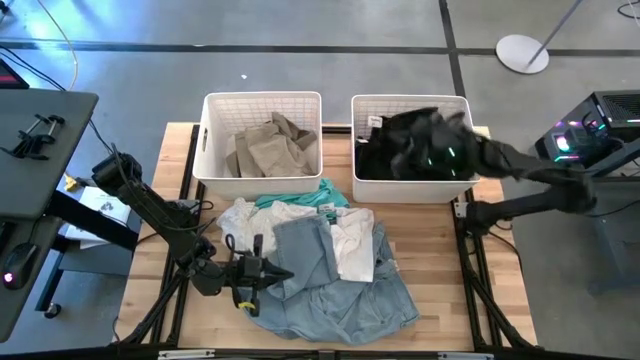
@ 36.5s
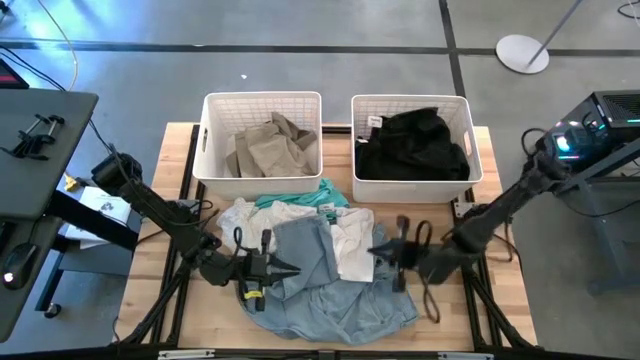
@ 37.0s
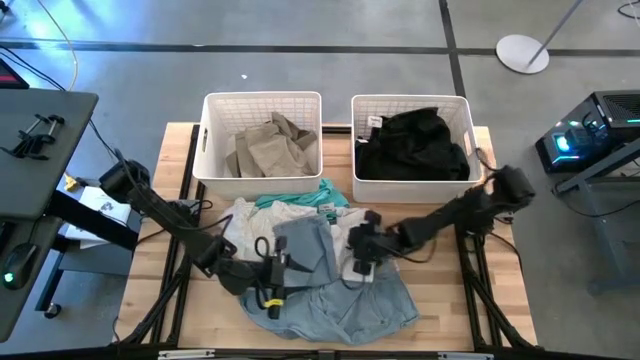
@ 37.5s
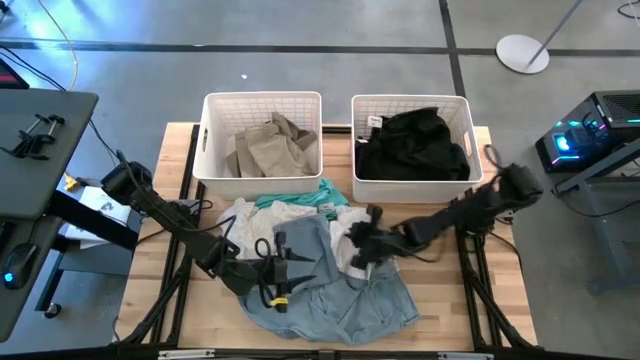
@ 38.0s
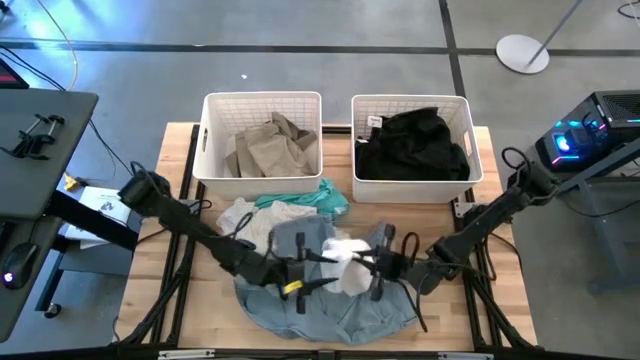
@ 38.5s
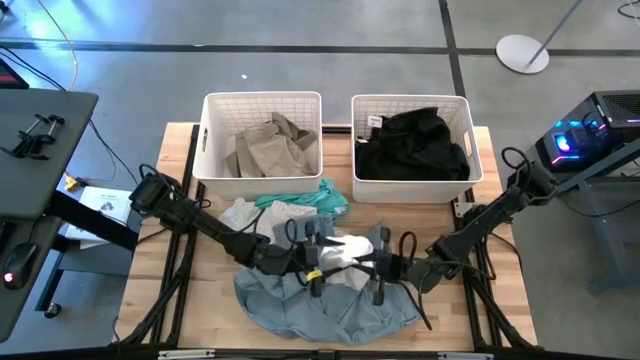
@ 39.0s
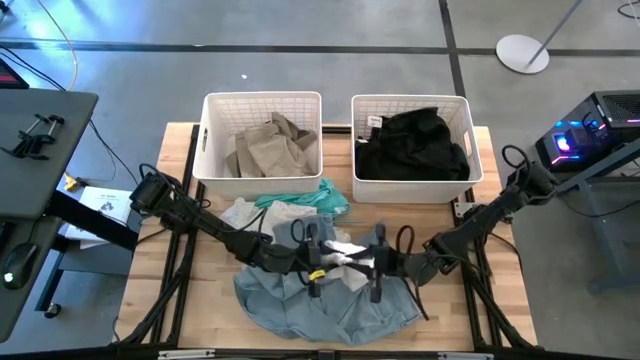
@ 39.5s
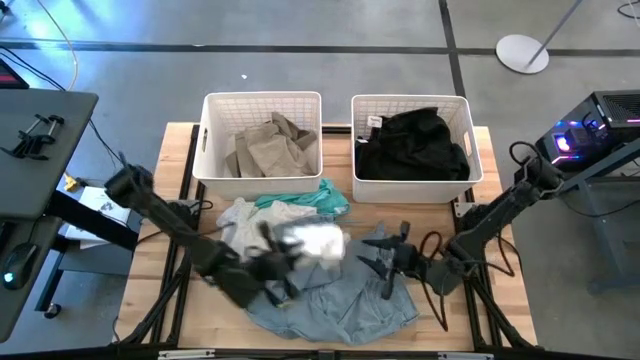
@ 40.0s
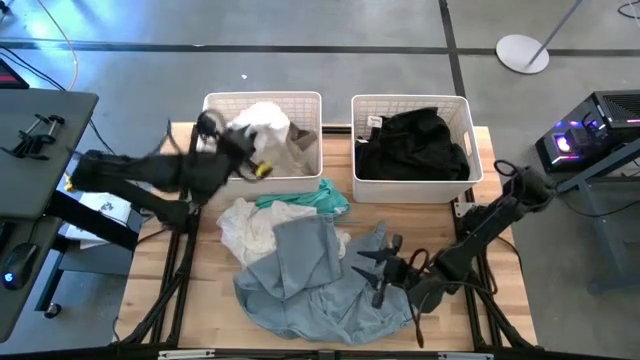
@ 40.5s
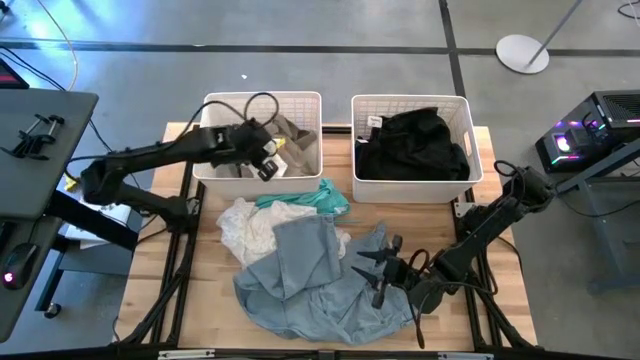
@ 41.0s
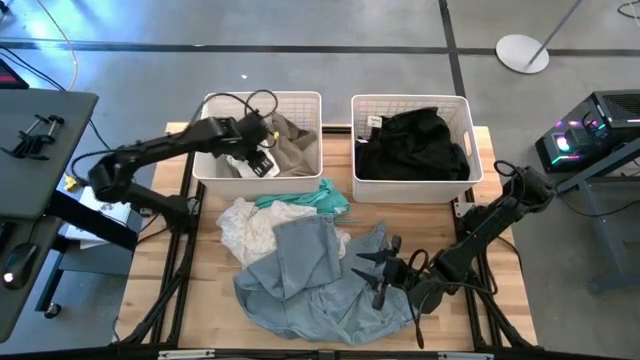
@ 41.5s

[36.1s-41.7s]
Task: Sort clothes
Put the white beanie into the left white laundry bin

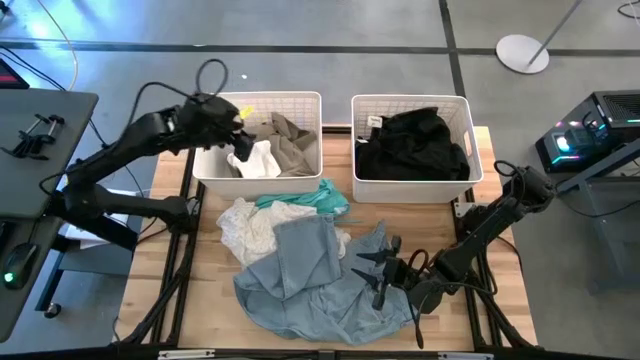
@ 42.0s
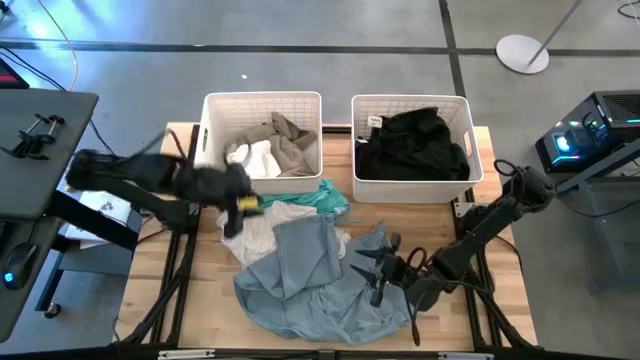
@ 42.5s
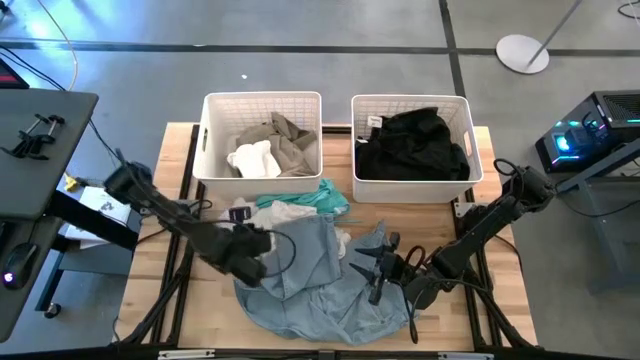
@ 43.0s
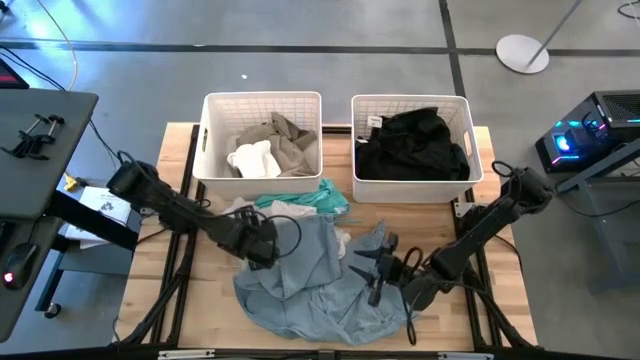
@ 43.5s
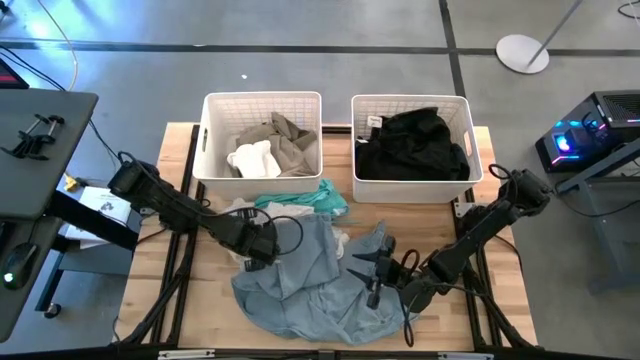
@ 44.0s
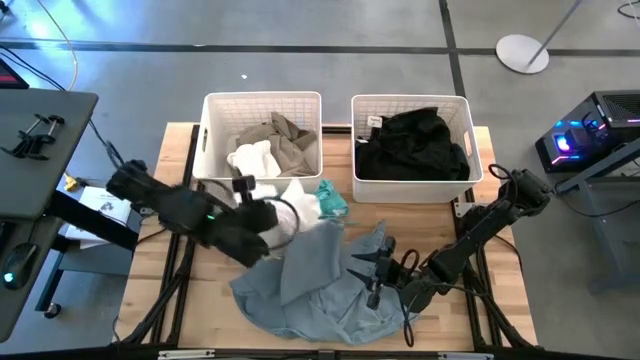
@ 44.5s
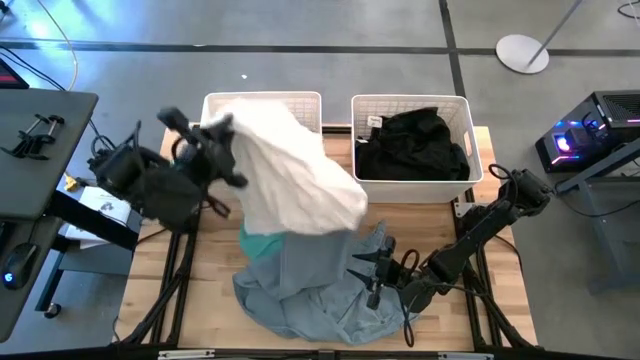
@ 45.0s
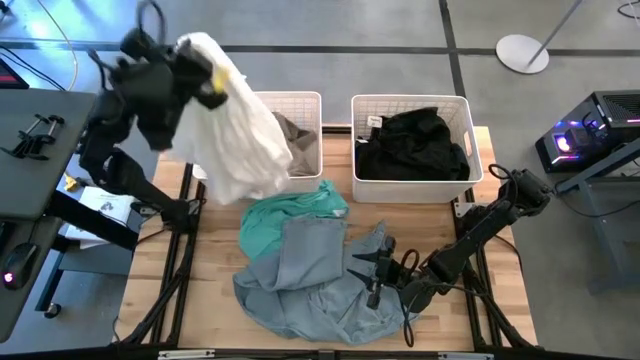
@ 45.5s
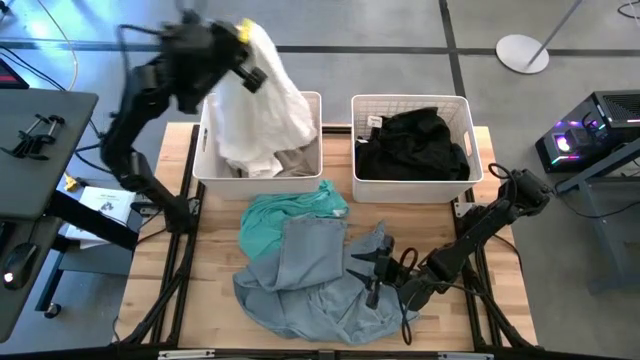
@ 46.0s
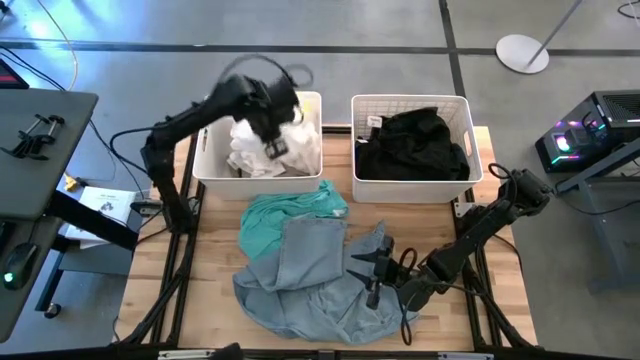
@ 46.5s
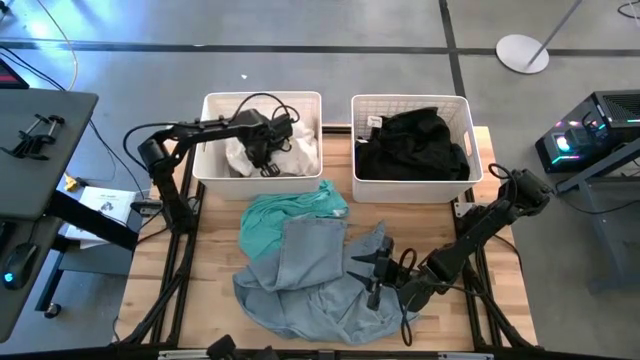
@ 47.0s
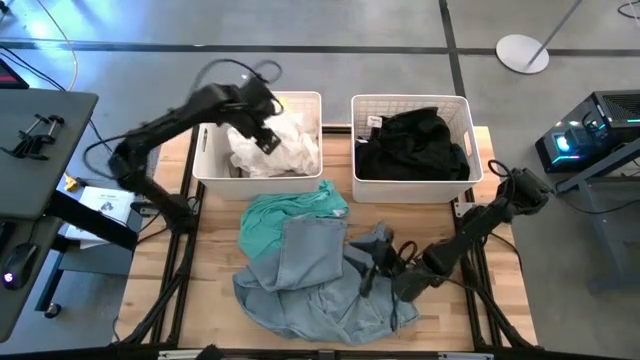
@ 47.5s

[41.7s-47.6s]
Put the white dress into the left white laundry bin

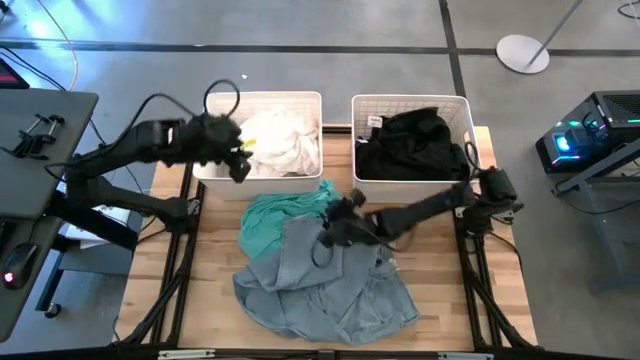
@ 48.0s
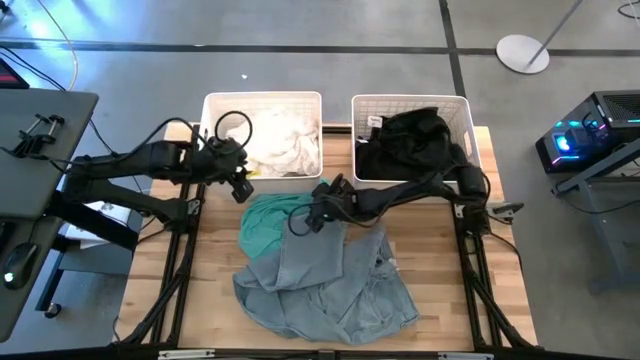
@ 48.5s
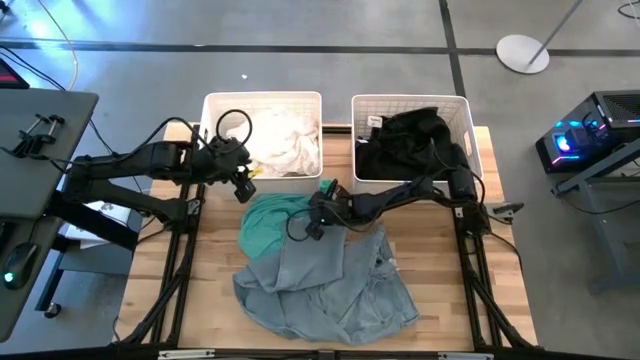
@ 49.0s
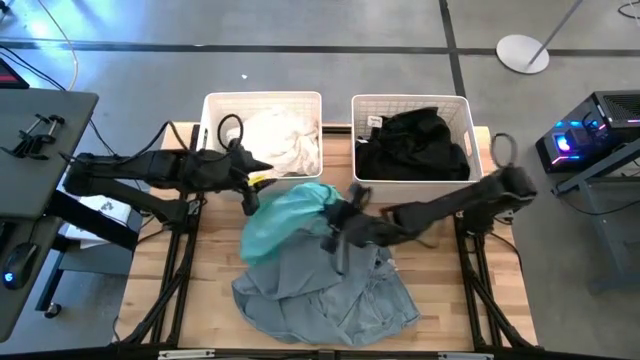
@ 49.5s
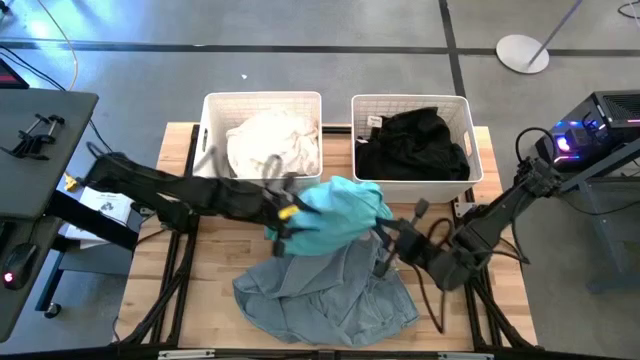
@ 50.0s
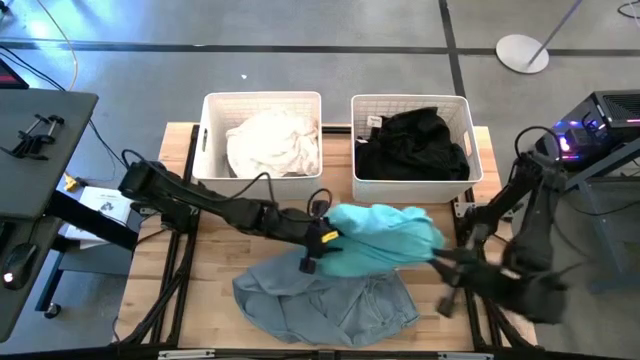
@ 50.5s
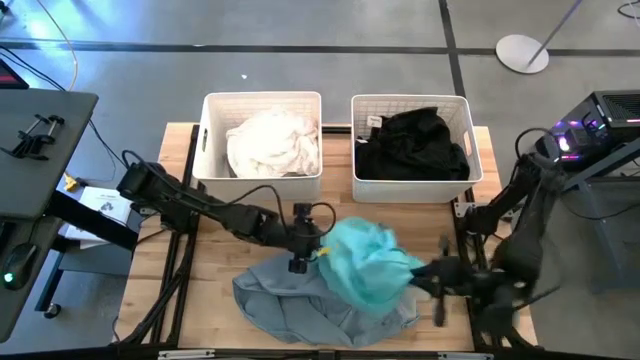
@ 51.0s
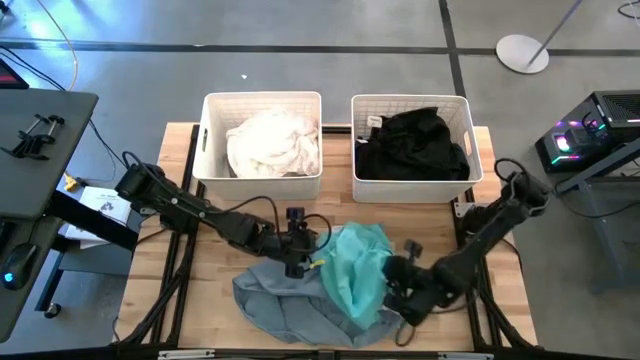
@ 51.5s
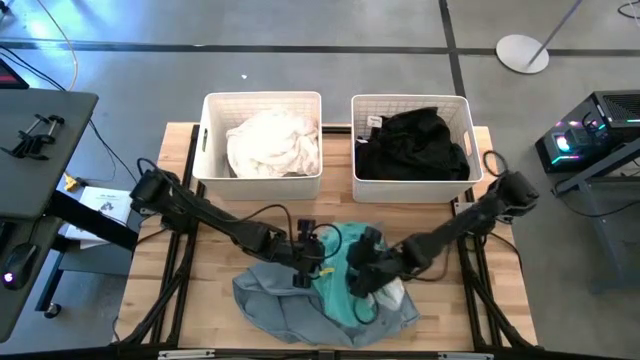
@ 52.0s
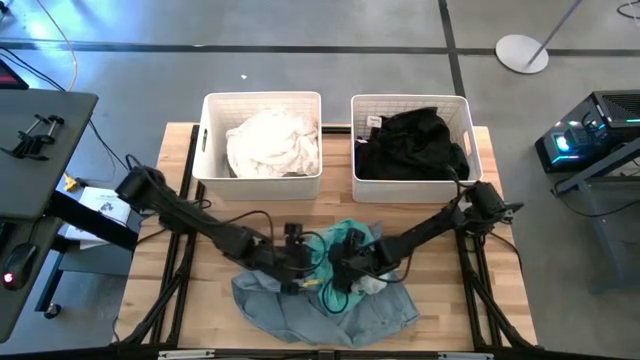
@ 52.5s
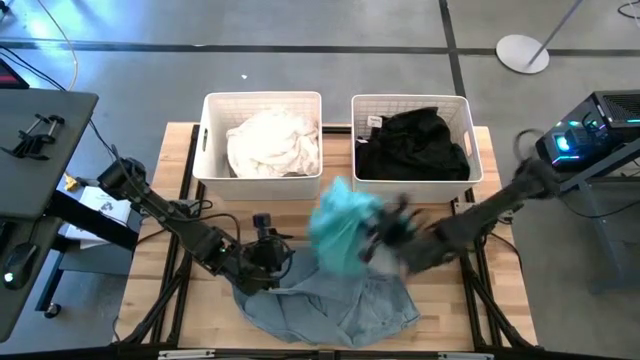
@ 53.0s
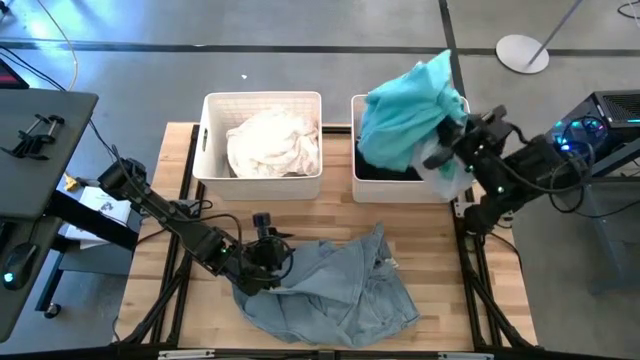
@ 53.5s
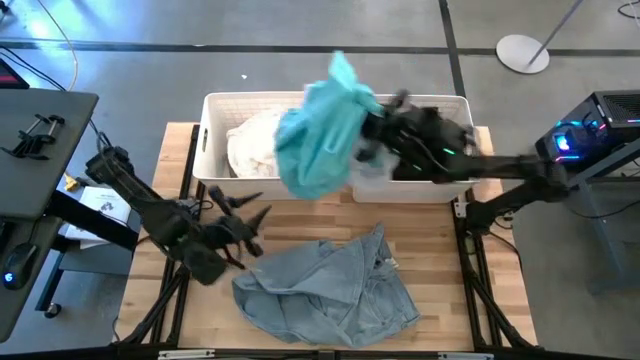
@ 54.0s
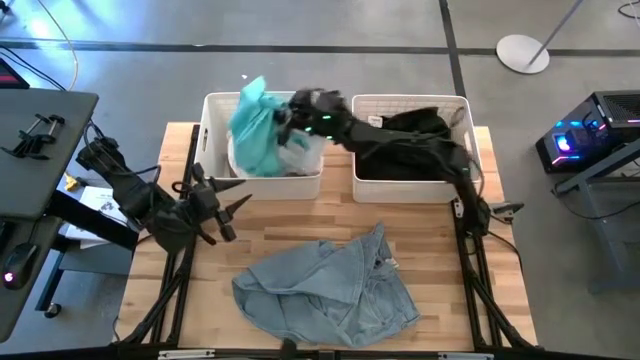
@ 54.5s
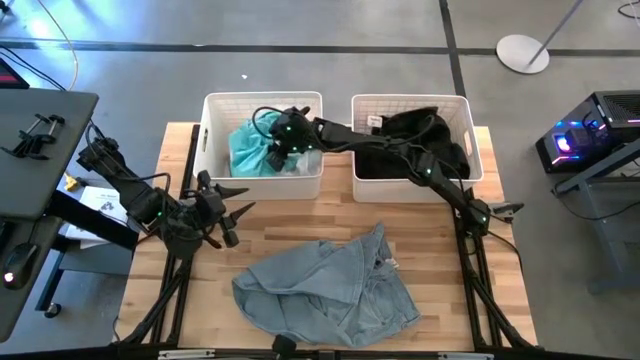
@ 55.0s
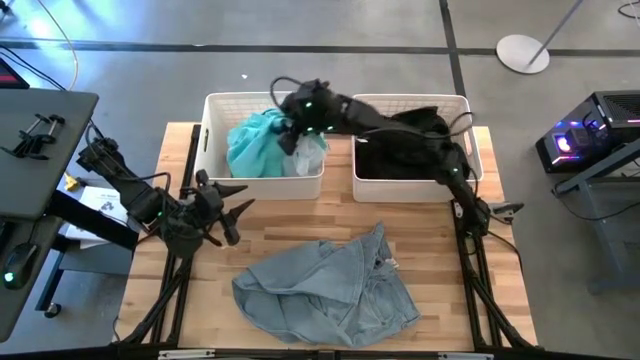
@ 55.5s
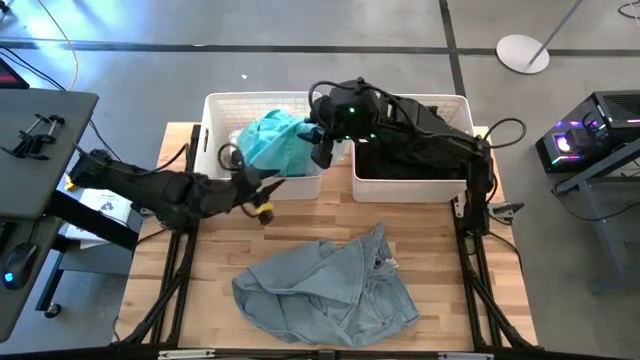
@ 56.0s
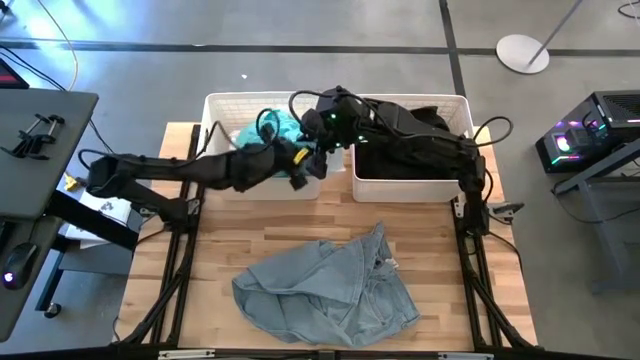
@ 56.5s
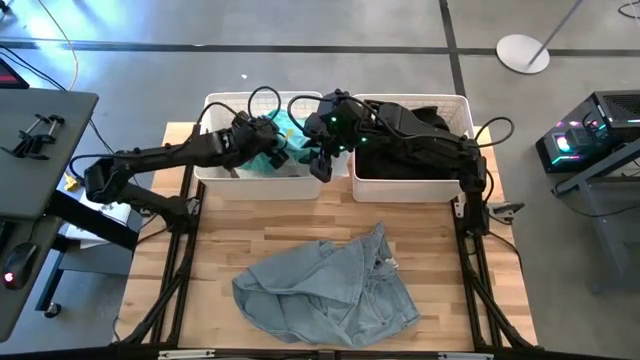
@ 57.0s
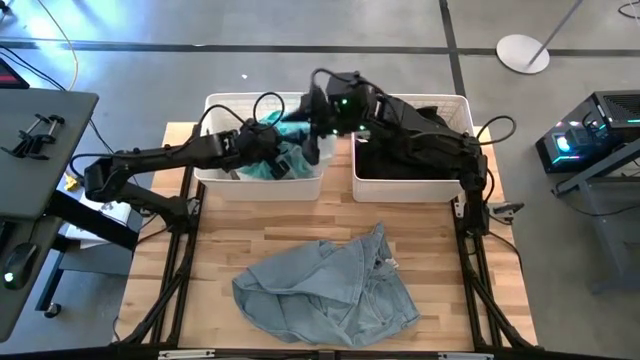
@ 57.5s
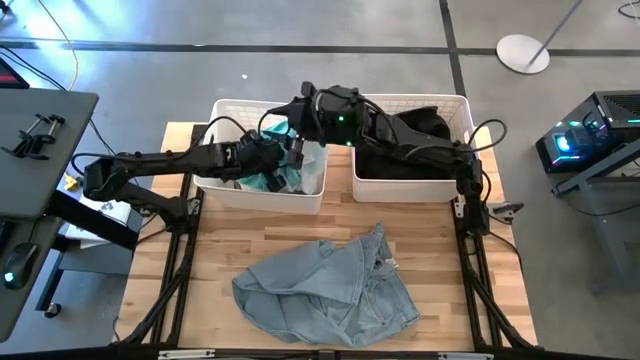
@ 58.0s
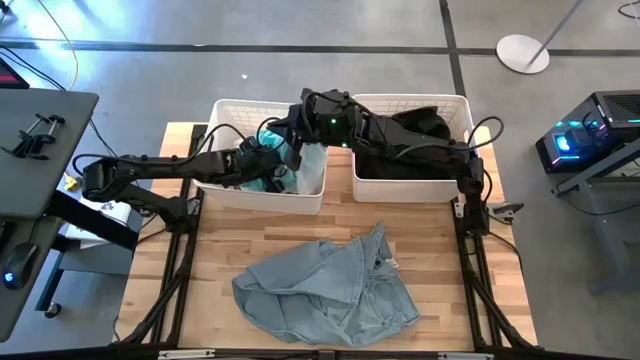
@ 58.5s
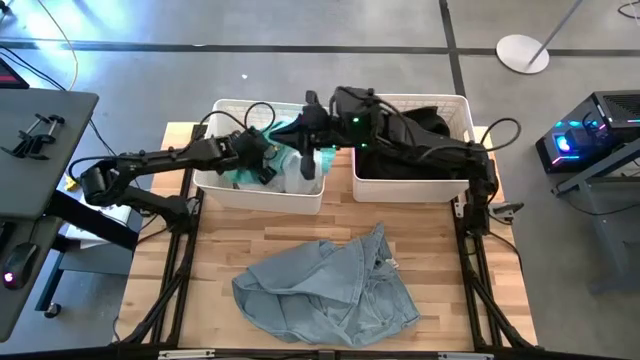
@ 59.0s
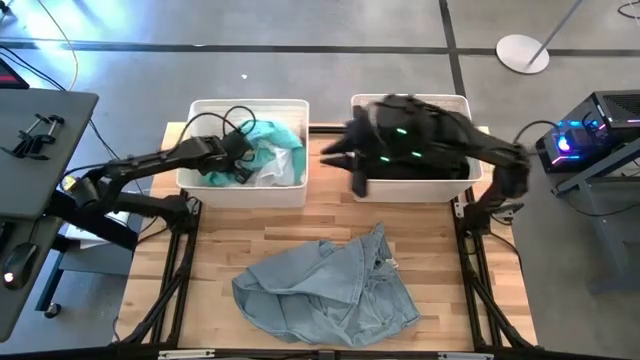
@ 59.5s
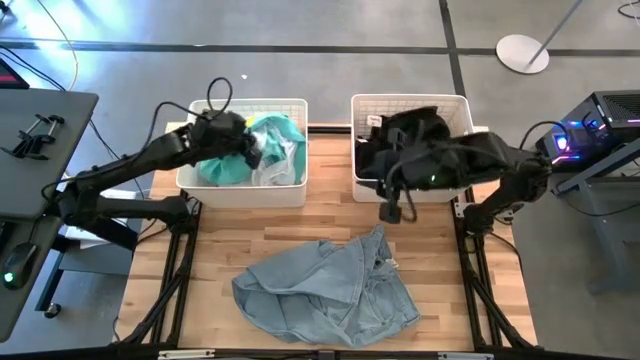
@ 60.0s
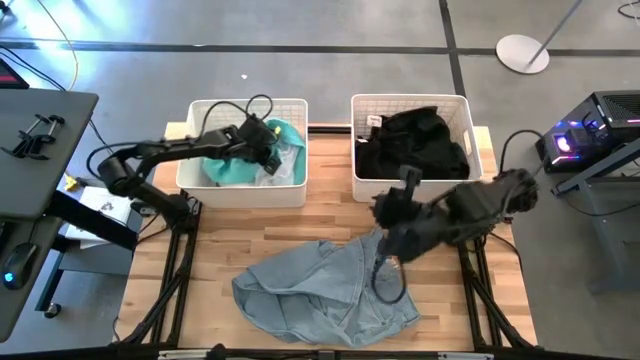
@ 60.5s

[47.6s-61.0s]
Put the blue shorts into the left white laundry bin
